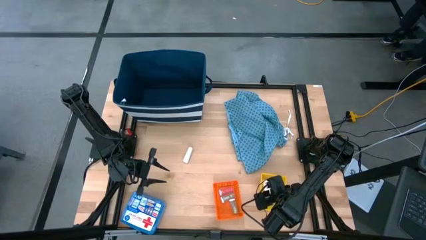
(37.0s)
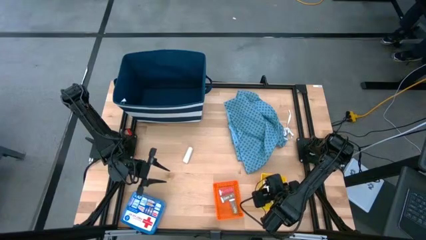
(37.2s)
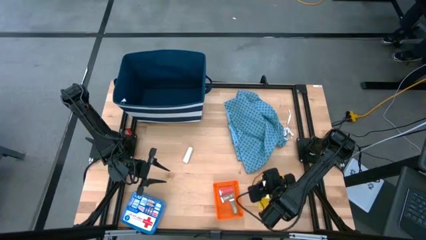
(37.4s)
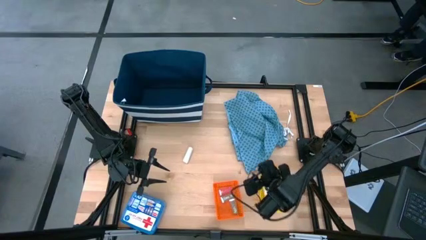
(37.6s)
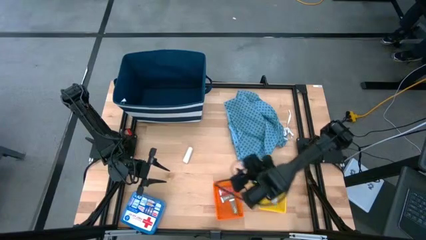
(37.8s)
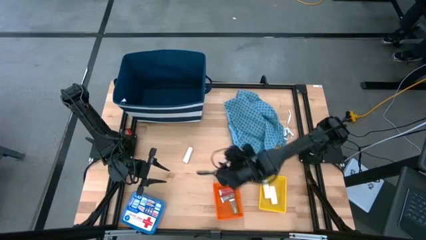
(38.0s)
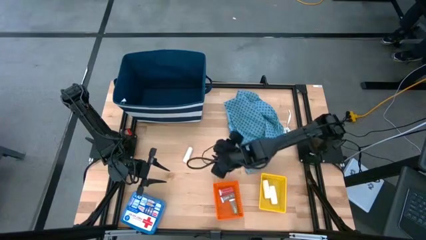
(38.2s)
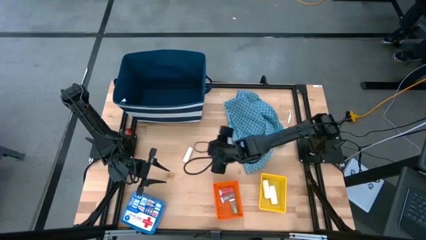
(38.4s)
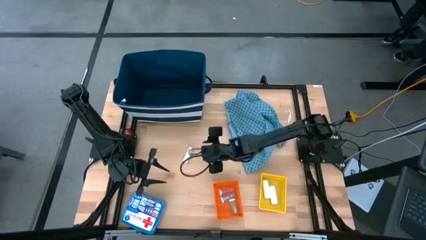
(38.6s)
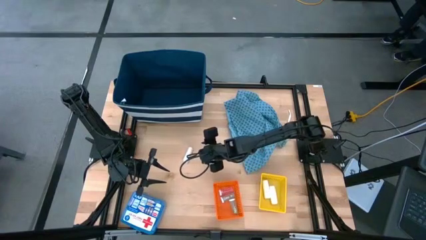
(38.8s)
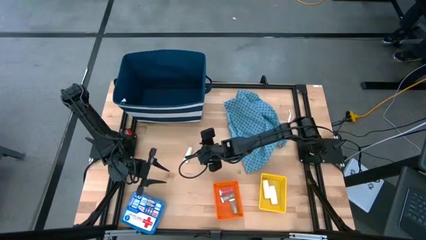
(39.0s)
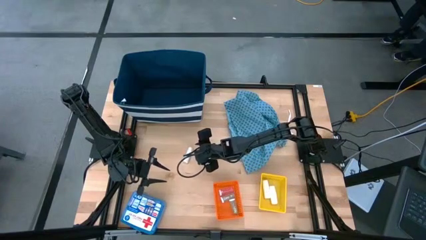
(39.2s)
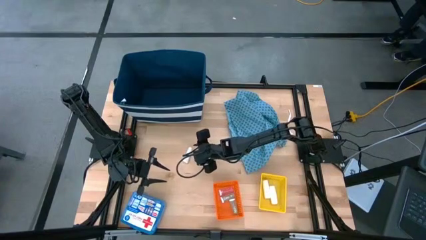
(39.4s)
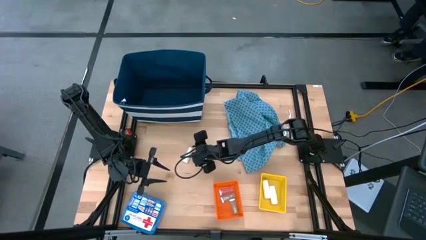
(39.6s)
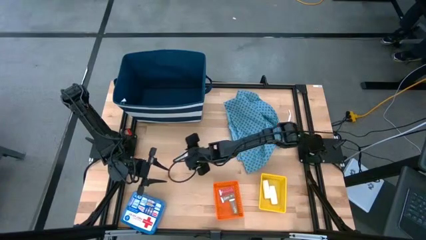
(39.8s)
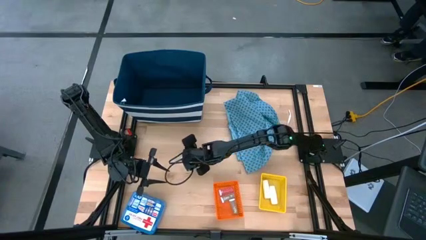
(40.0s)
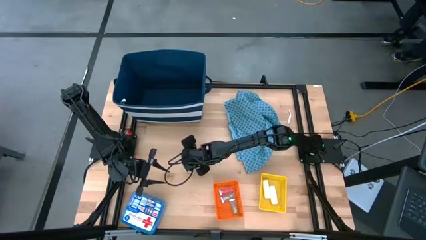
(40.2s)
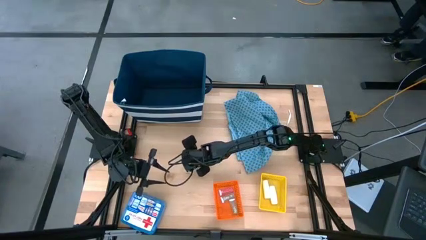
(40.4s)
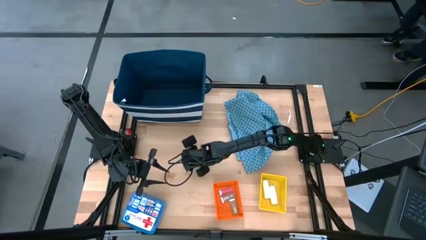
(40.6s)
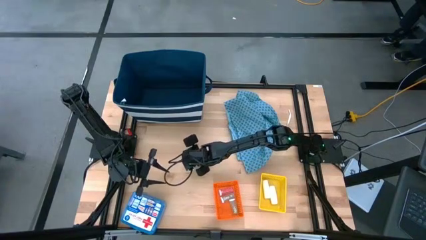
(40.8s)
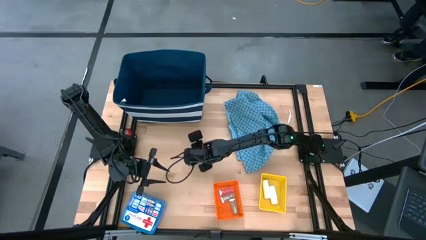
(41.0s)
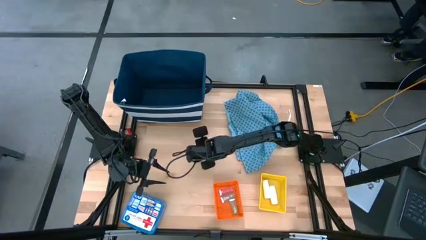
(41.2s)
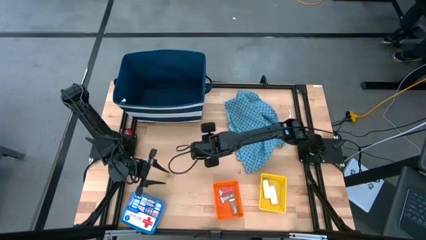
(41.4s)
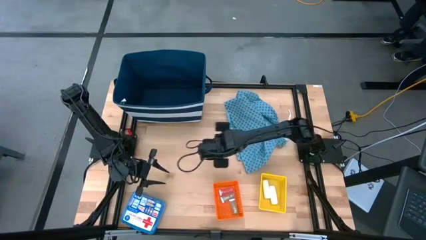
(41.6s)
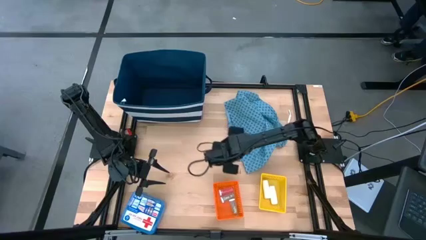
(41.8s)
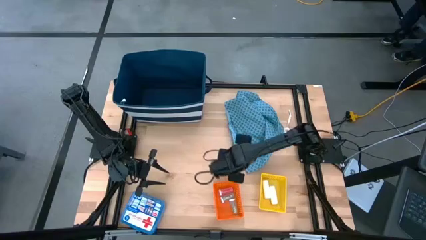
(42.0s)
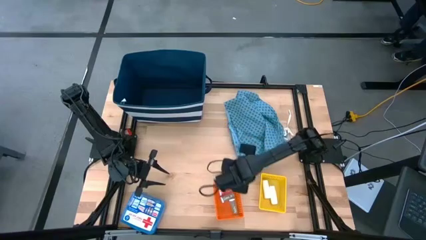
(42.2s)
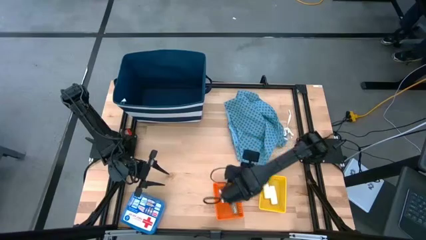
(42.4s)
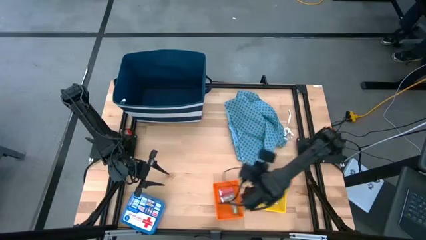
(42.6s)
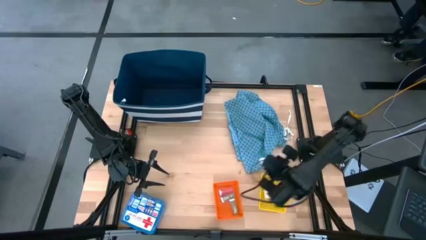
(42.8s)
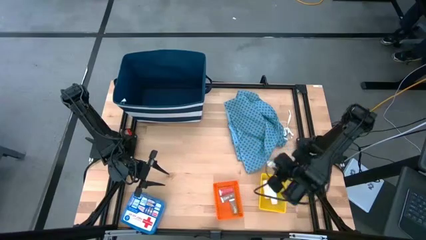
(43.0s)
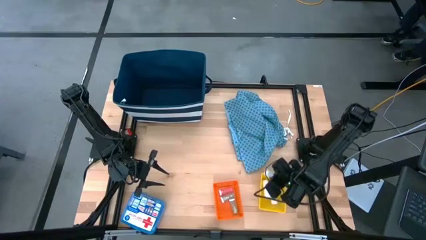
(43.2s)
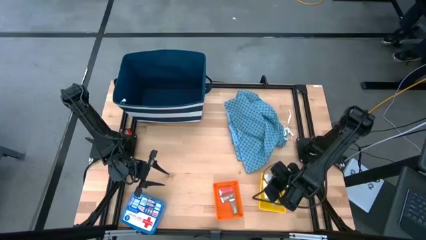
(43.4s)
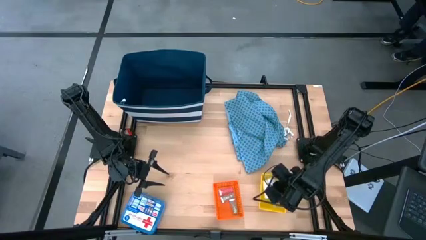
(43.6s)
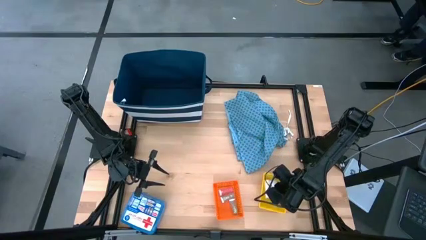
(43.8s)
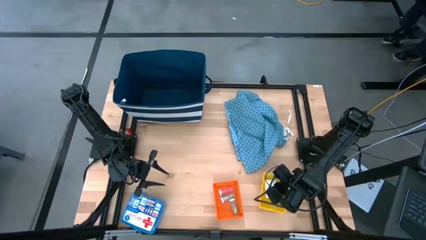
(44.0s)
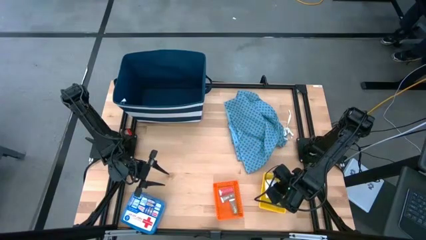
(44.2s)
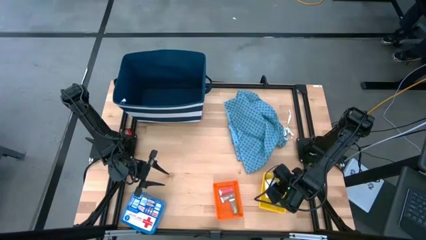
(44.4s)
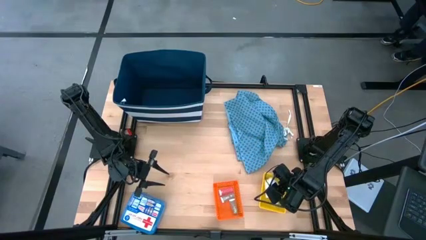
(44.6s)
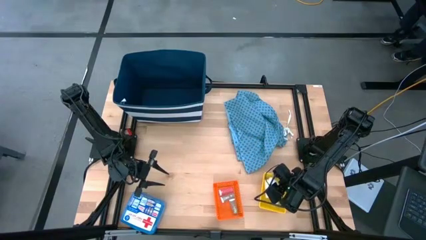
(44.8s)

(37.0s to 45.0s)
Task: Pick & Place Medicine items
Put the rolled gauze into the yellow bin

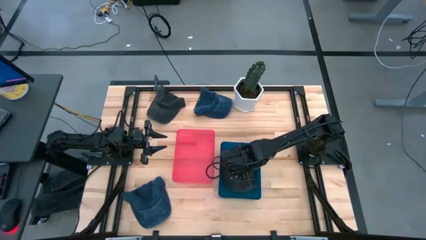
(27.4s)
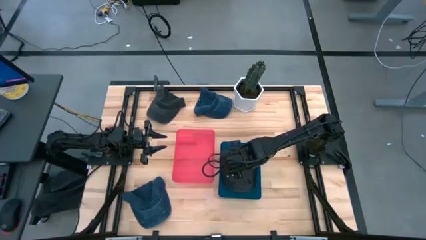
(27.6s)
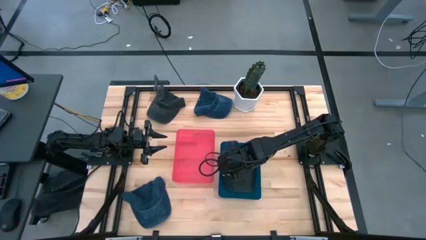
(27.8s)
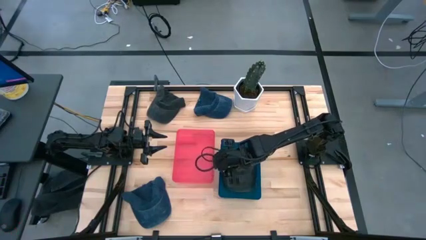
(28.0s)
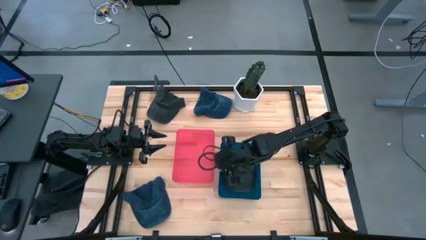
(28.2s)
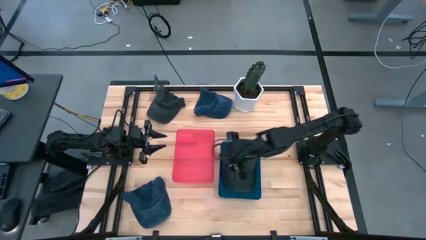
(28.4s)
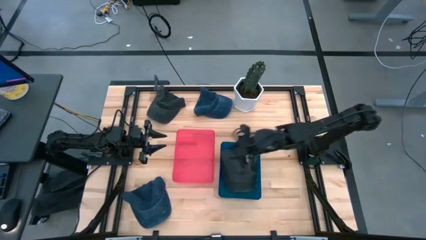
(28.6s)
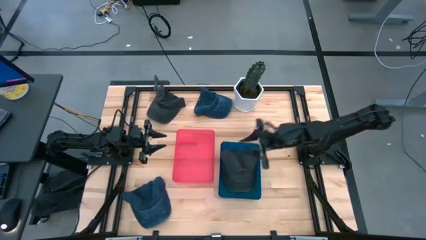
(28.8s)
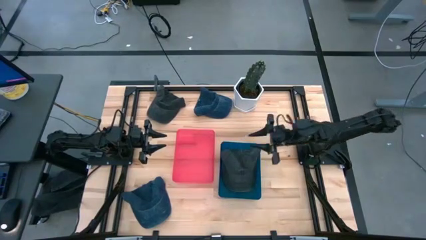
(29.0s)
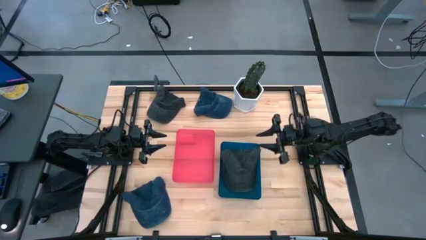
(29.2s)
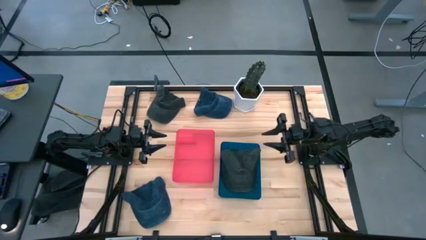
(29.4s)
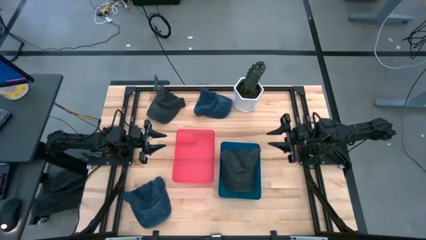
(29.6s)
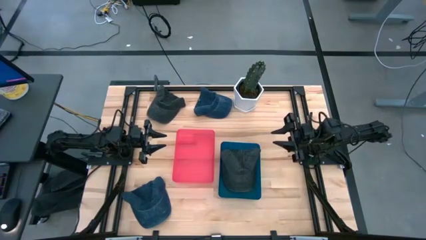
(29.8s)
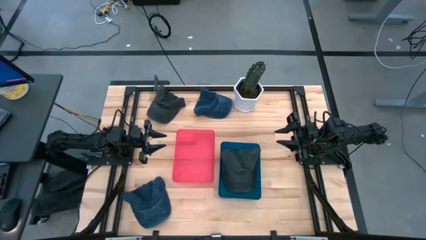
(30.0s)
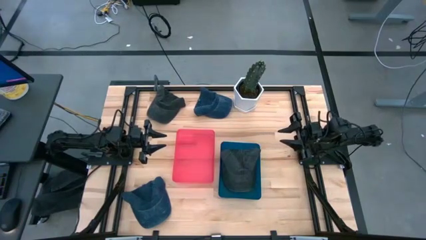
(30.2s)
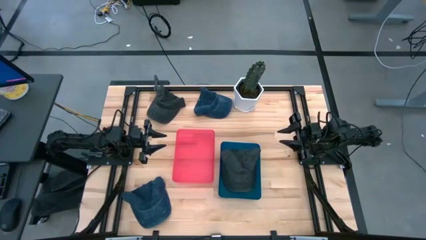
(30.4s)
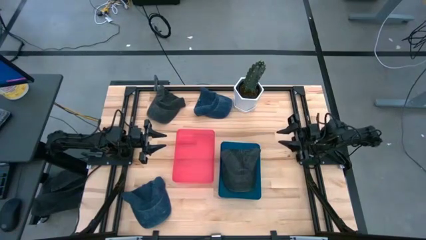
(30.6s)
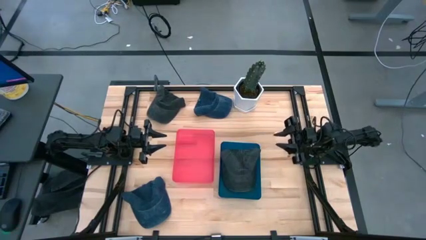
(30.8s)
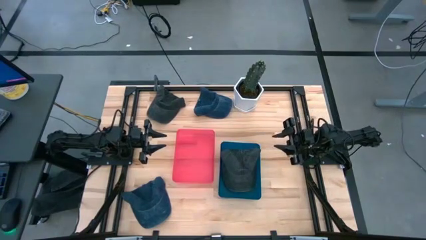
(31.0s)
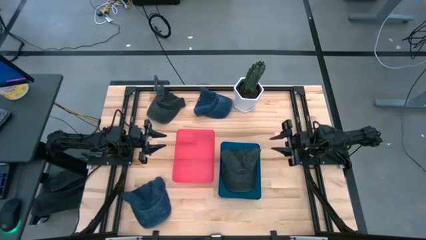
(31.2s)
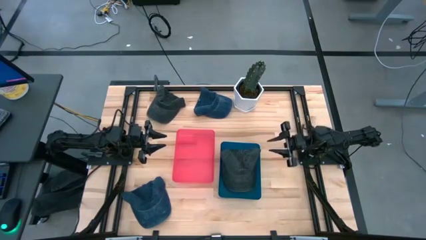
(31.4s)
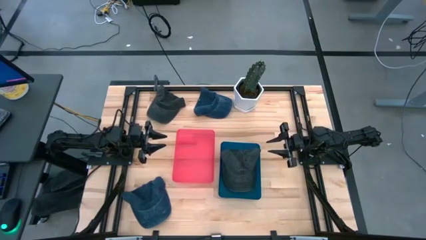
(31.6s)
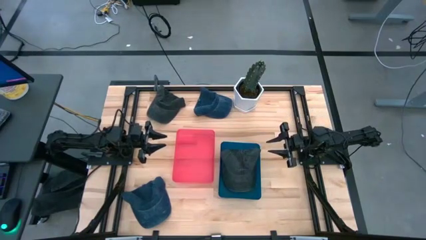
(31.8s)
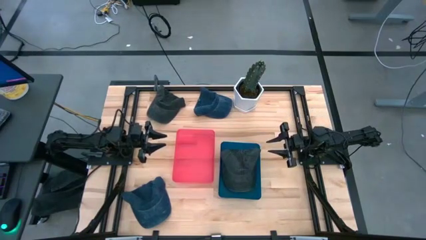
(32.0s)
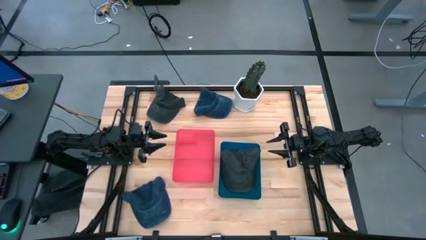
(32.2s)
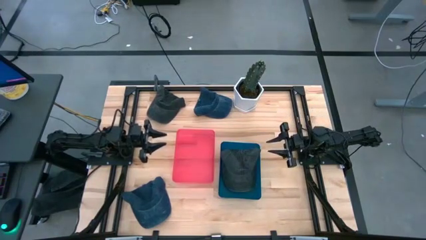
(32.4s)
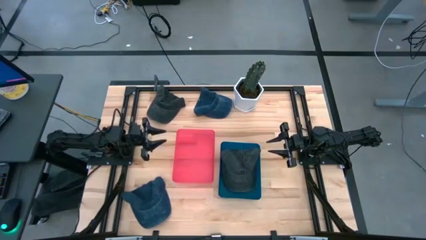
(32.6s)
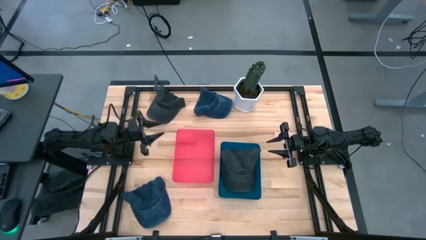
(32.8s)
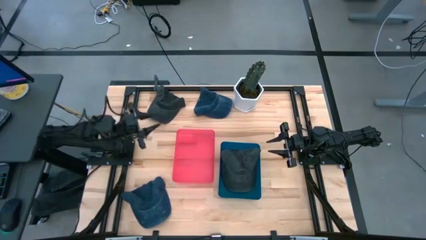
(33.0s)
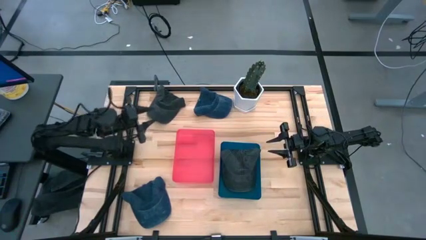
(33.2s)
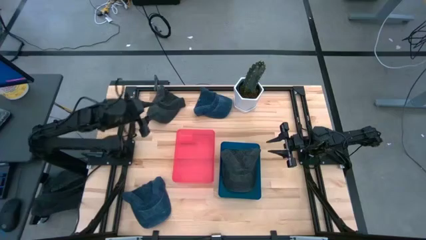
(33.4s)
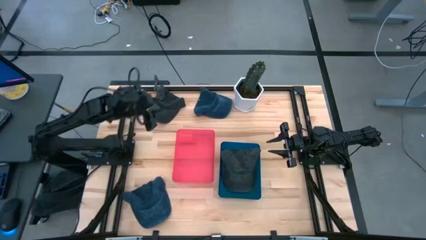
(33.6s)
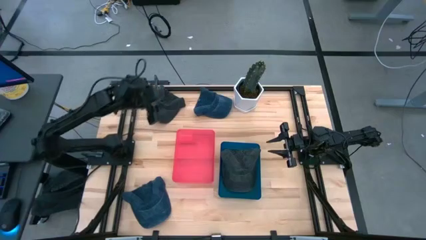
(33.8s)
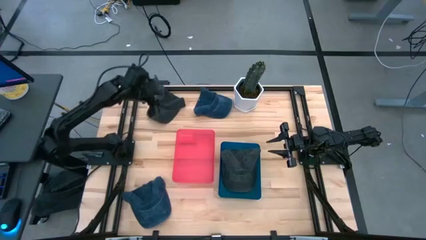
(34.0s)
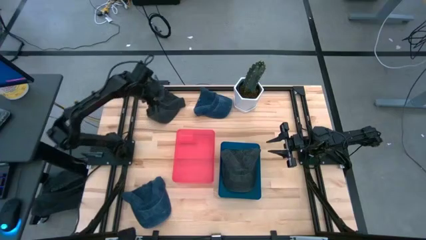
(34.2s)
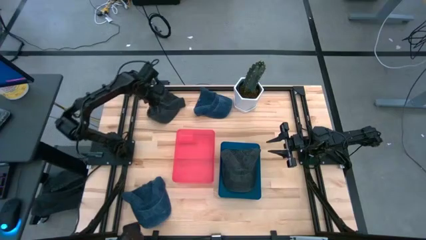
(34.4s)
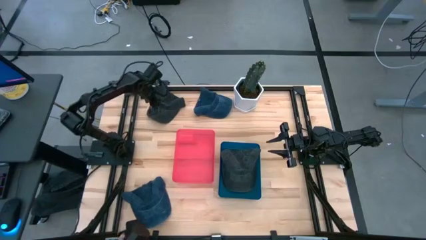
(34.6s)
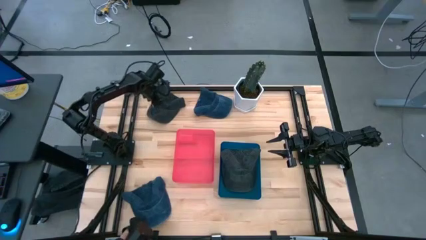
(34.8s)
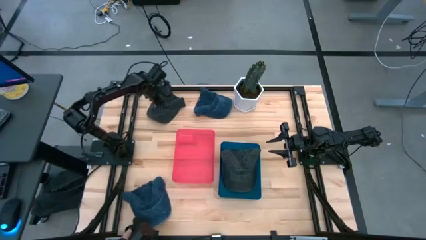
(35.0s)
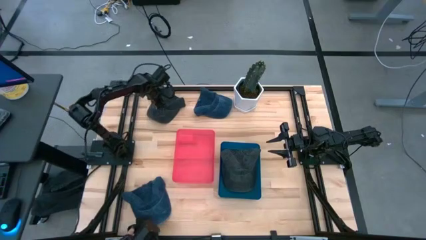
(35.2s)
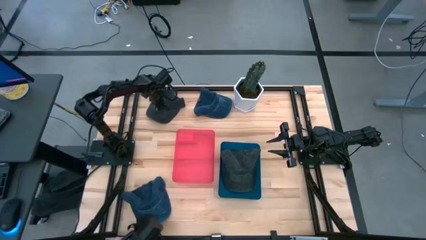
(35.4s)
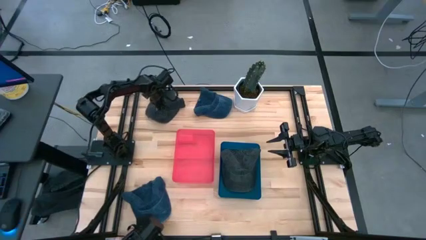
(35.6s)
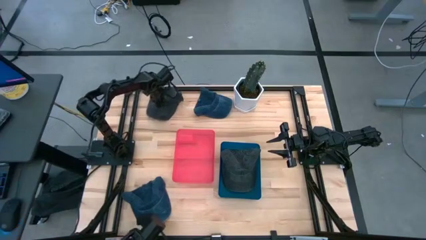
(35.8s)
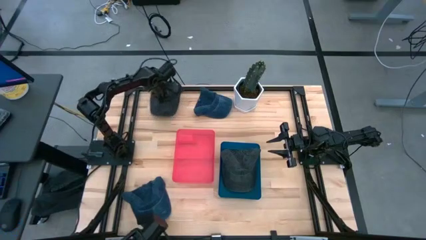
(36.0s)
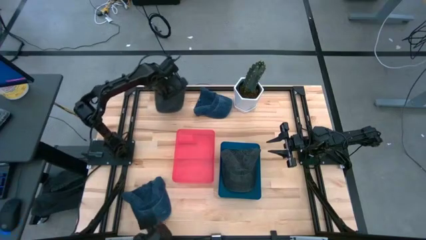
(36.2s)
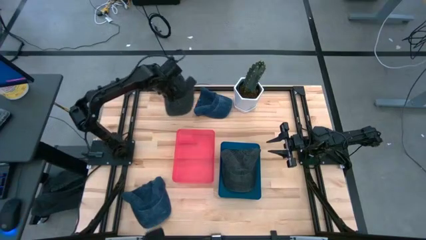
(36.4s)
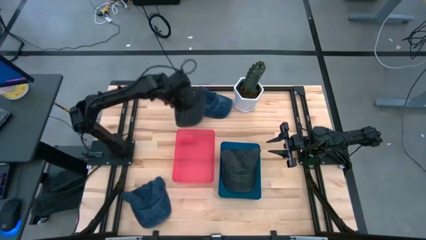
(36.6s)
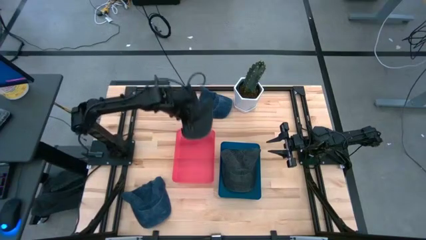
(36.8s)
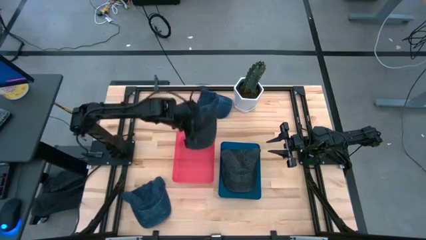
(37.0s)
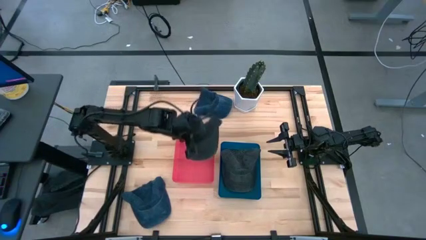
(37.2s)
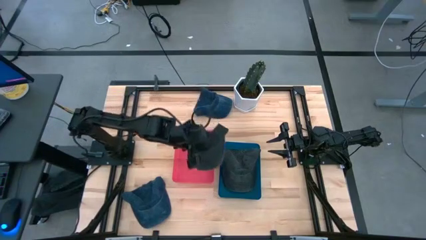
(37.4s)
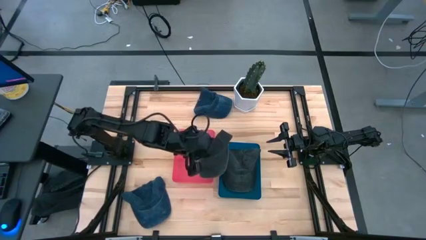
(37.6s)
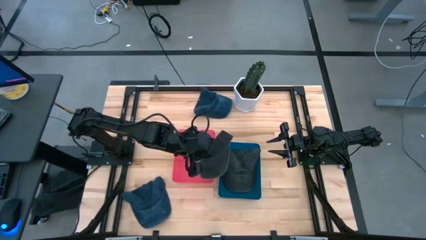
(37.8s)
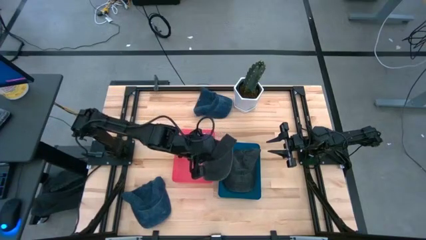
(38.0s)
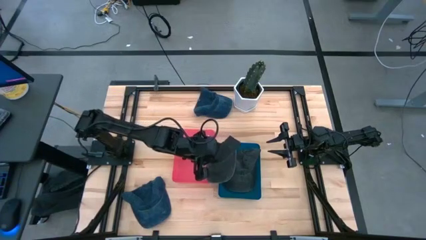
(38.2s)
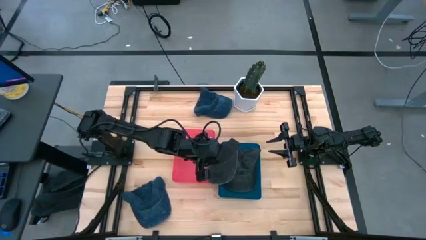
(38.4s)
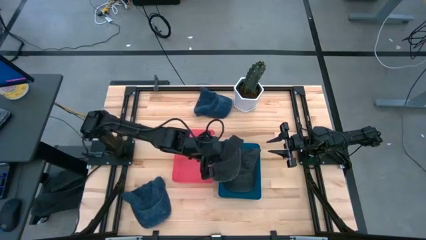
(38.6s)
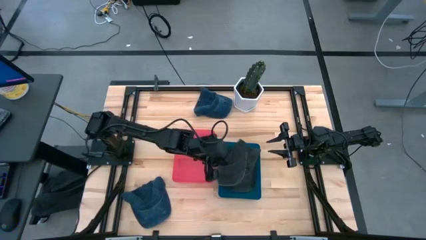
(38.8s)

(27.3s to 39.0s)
Task: Pick & Place hat
Put the black cap into the blue bin
